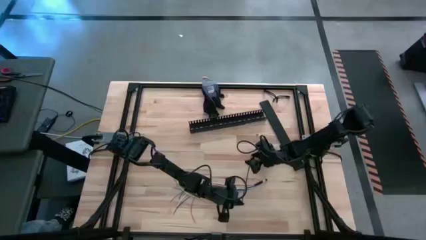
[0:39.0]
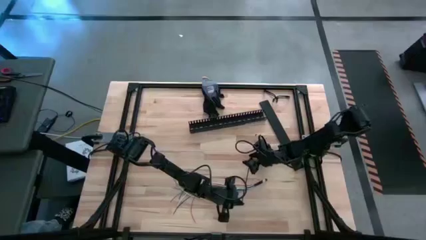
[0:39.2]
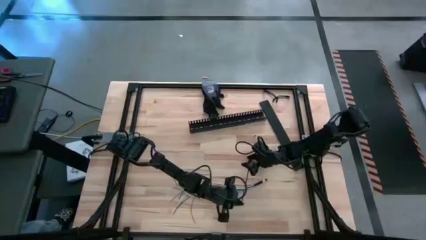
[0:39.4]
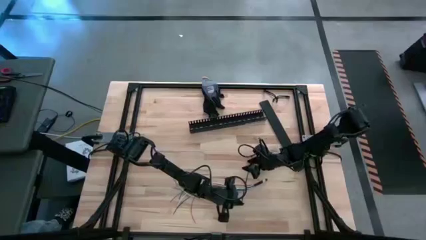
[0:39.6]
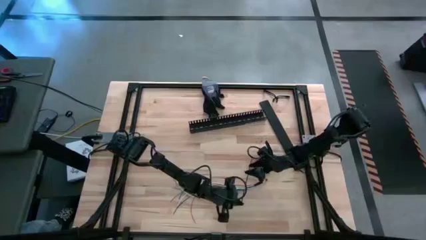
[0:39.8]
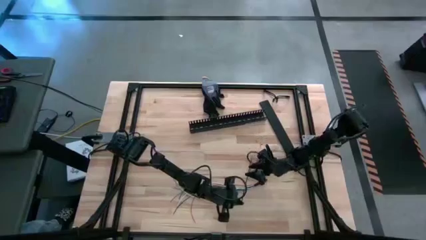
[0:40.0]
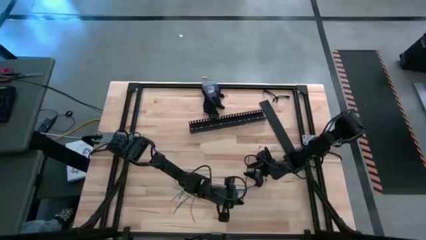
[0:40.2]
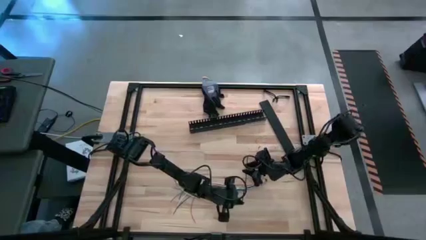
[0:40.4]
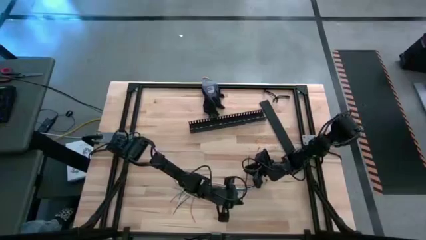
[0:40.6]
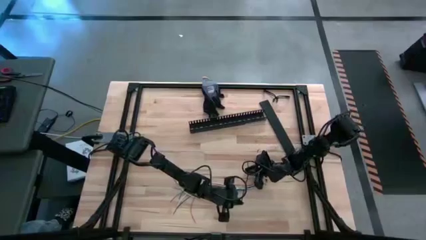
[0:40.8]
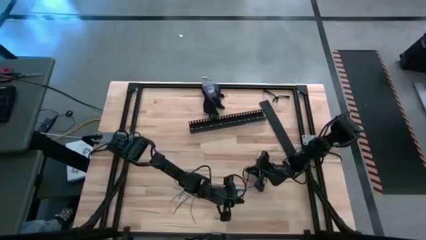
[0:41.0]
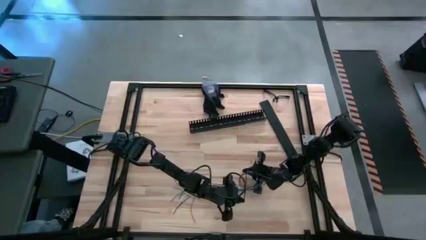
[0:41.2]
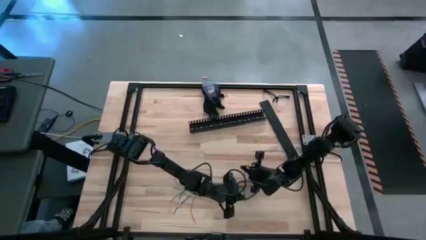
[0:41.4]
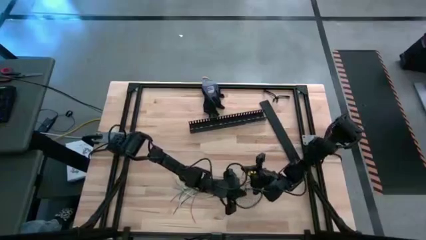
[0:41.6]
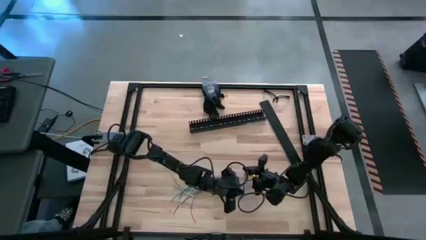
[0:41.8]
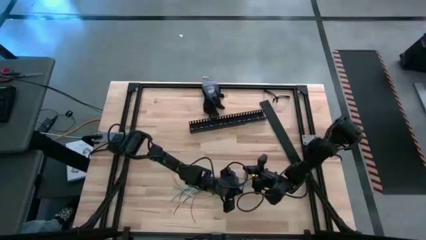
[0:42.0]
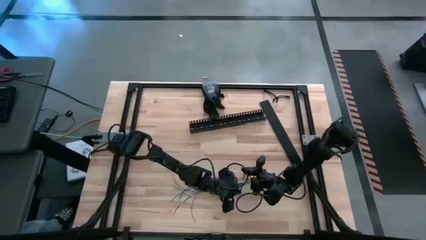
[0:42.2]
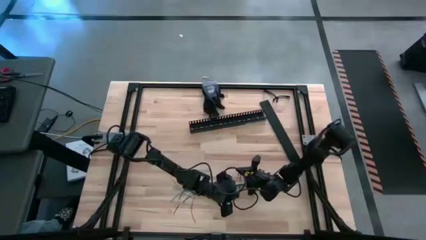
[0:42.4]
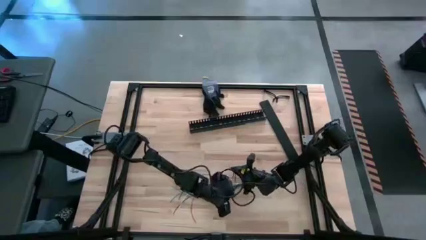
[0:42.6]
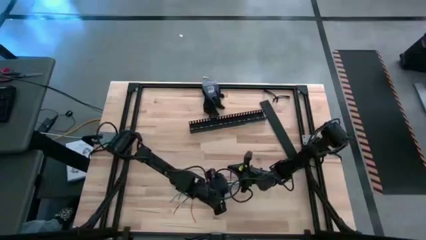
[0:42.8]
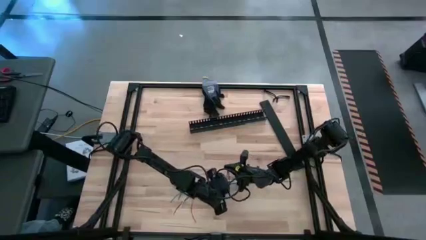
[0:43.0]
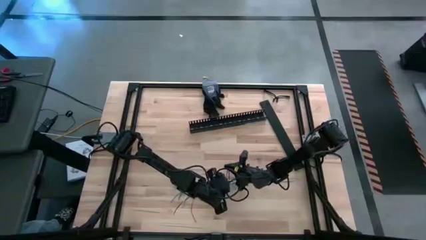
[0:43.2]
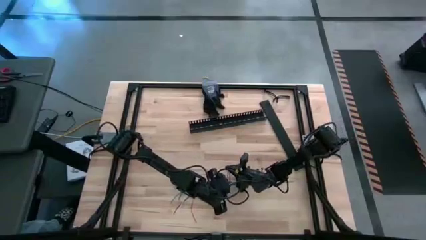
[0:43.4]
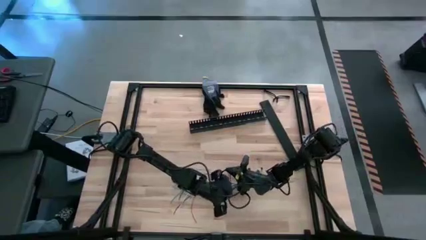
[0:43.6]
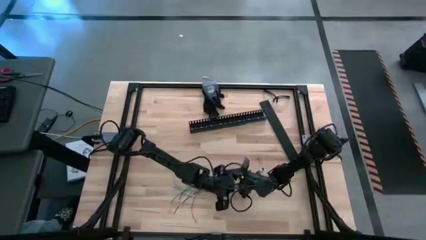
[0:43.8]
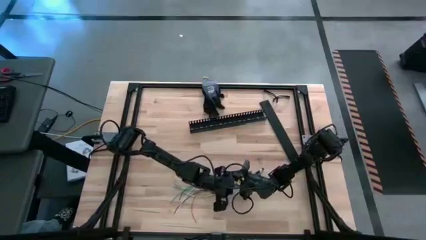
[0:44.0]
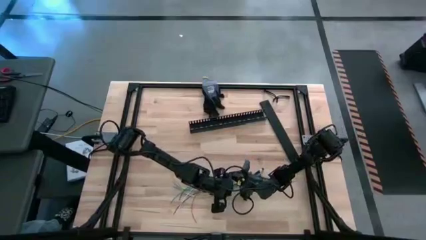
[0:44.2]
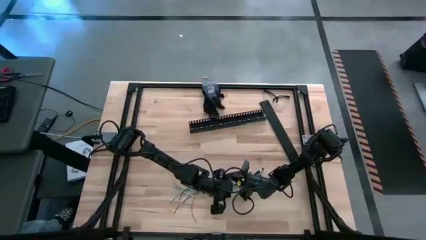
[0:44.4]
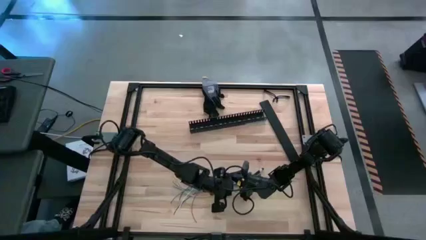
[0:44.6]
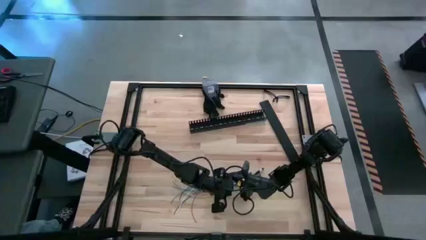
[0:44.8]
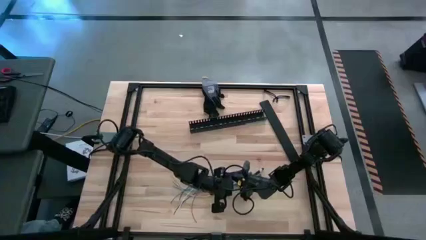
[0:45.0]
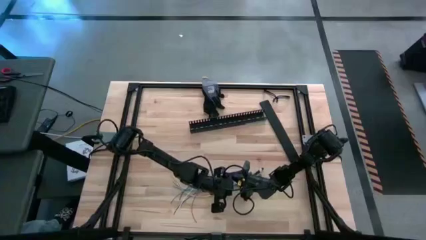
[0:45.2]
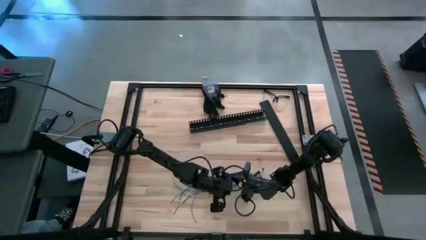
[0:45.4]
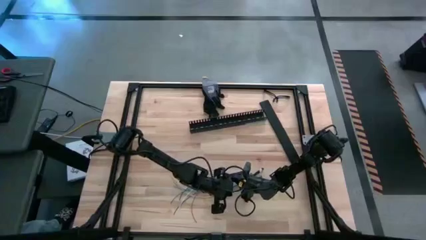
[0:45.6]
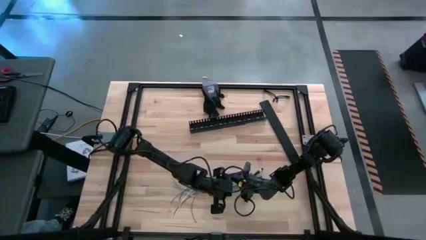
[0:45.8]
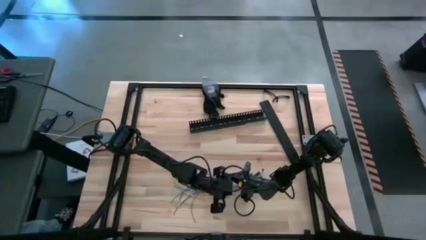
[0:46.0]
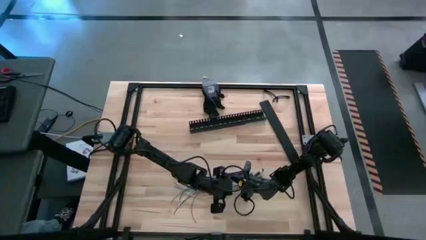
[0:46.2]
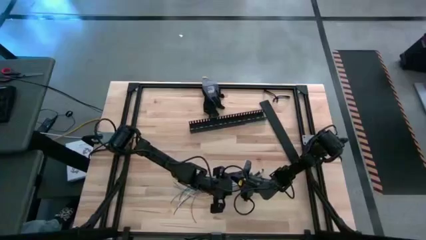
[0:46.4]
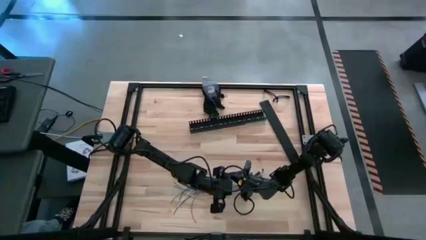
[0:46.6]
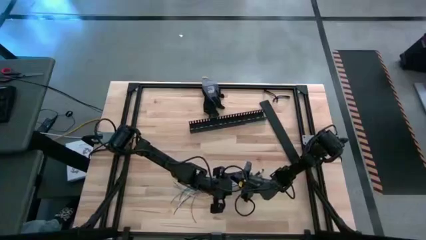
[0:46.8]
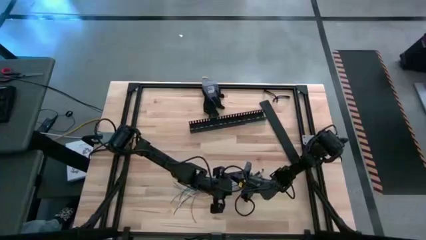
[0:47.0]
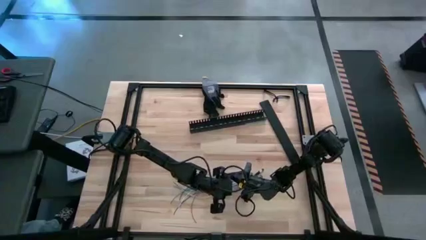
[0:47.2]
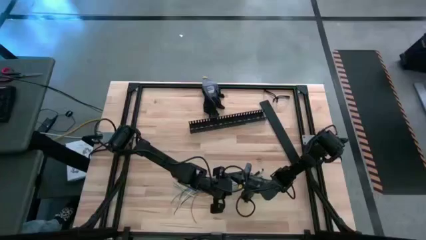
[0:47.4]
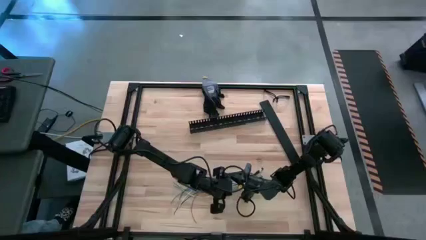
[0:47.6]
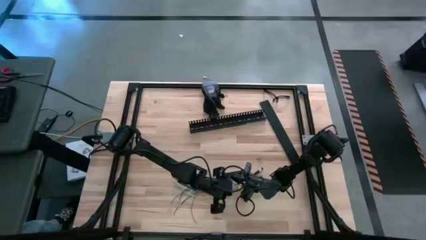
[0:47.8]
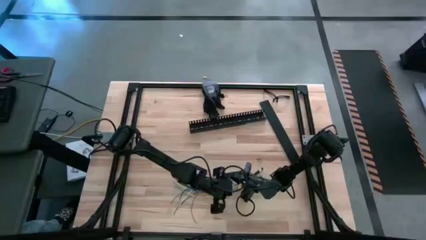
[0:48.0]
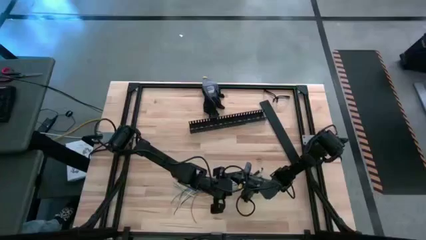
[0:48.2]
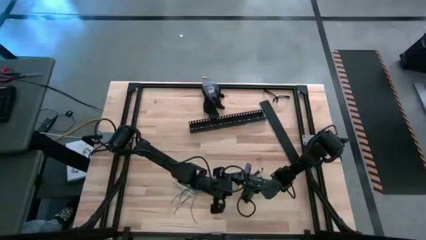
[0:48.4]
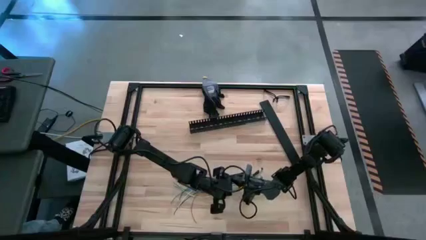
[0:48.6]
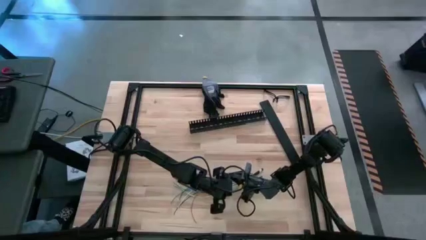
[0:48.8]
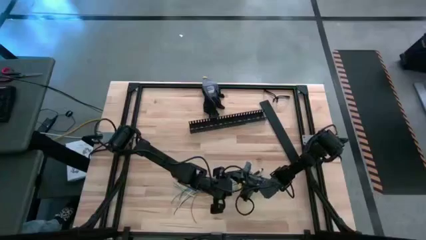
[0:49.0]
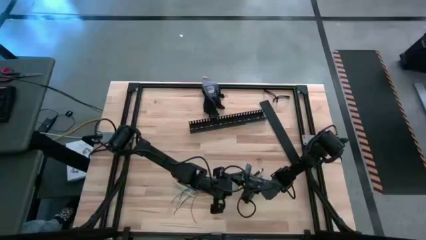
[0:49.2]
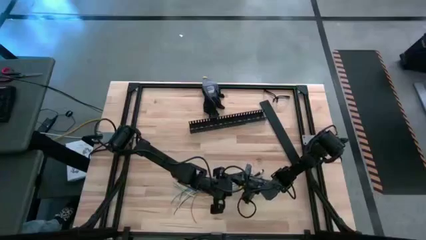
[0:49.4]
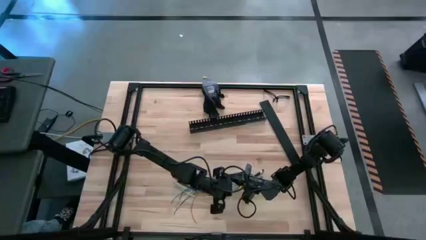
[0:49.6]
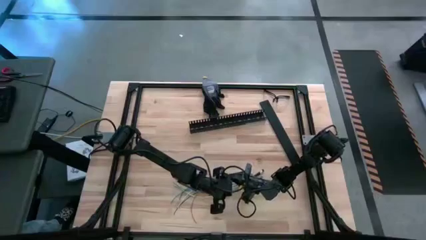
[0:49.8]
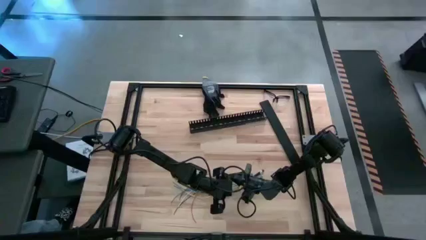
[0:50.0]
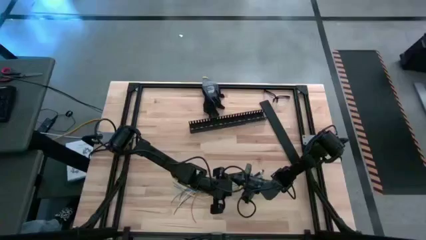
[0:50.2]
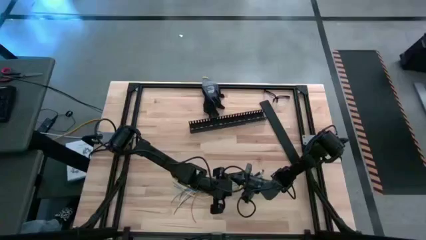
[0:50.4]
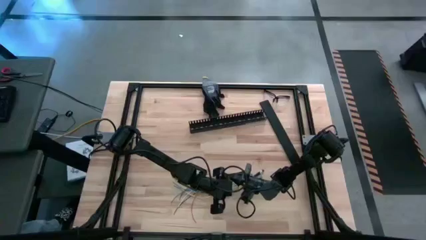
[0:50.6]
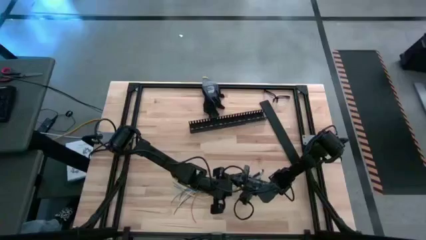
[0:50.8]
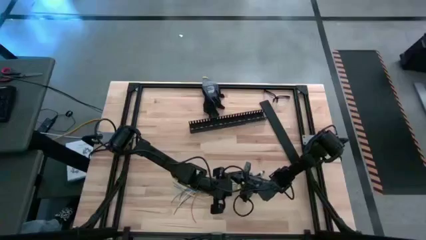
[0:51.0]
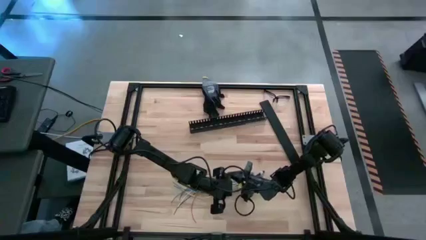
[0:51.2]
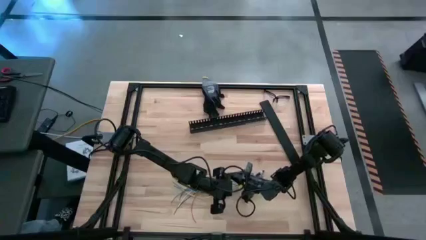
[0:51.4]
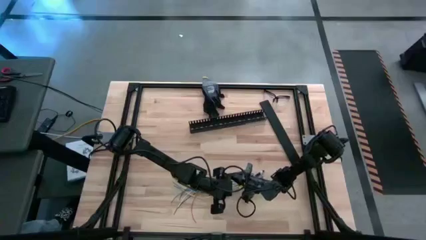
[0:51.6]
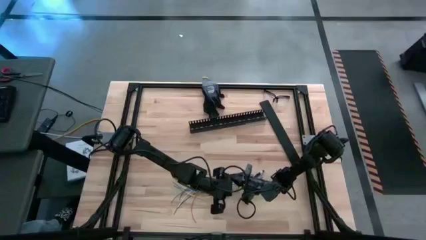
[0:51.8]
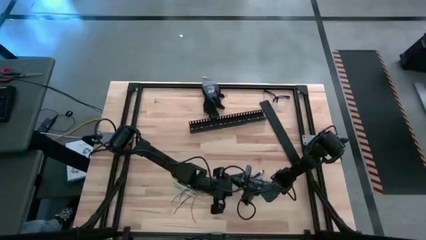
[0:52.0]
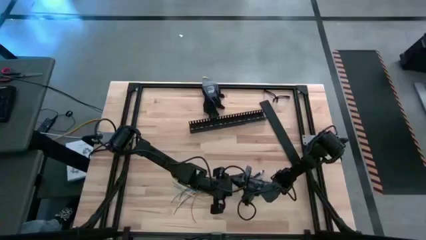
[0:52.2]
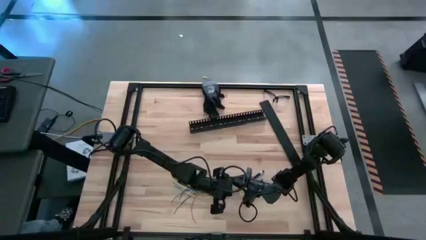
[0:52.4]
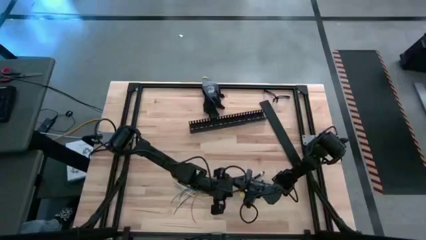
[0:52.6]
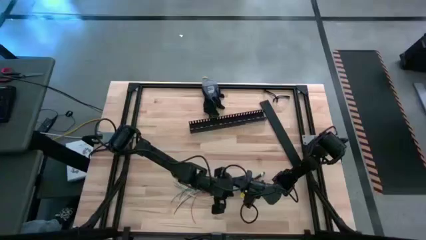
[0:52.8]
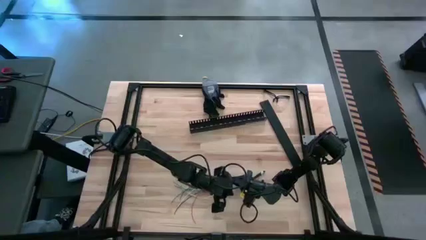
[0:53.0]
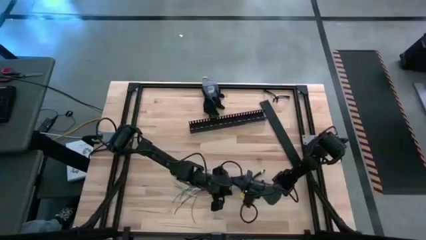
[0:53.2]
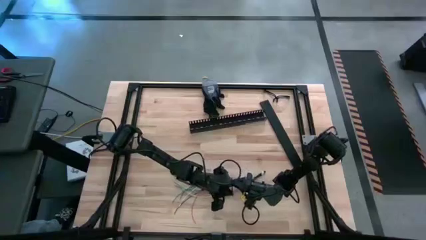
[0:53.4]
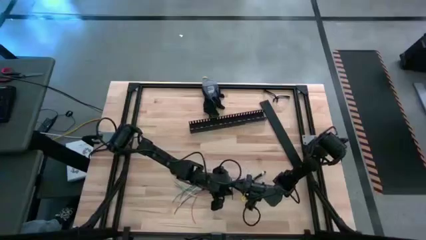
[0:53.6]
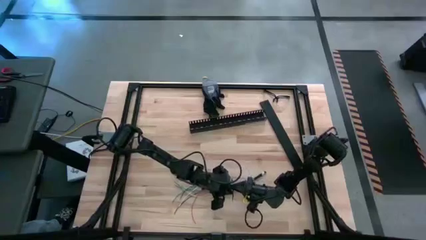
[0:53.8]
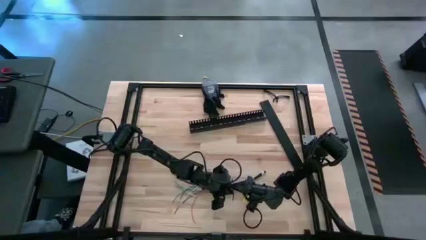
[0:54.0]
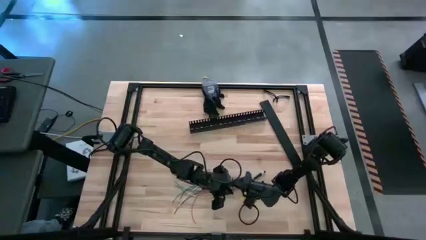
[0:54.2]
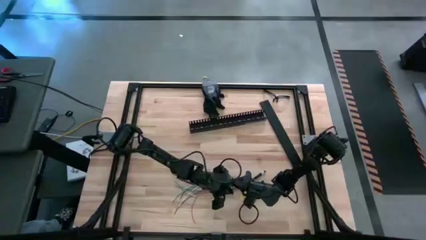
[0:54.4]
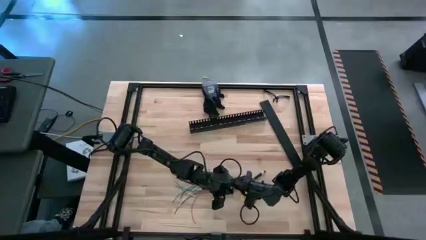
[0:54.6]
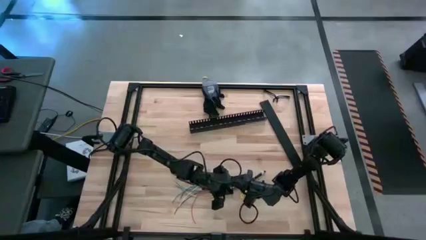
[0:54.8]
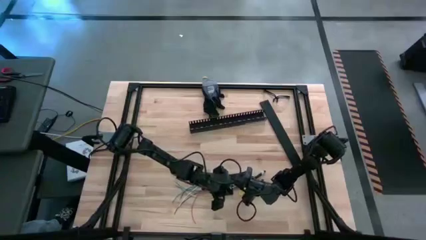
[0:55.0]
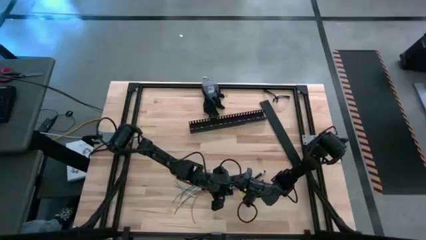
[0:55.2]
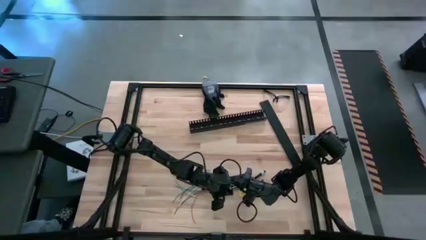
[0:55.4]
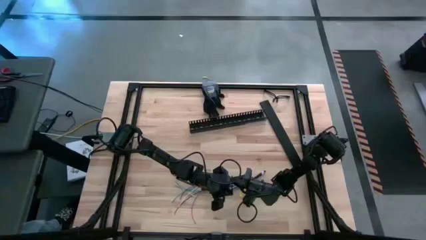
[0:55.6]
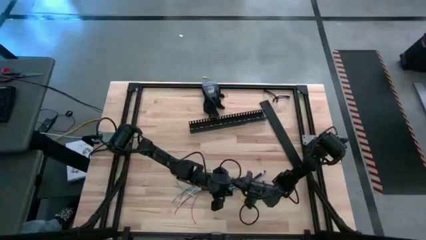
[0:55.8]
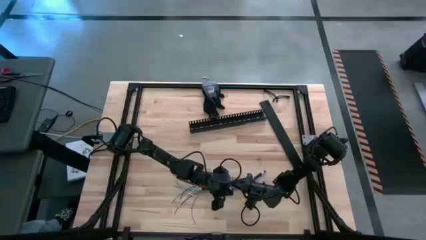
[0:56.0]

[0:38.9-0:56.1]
Task: Ziptie cables
Wrap the colored loose cables with the black zip tie
